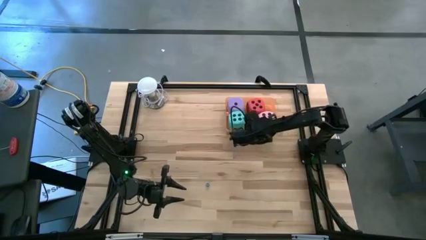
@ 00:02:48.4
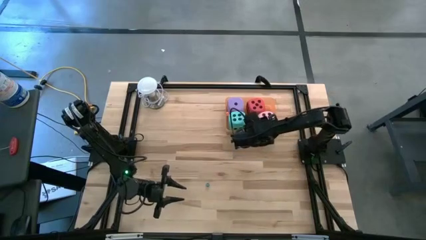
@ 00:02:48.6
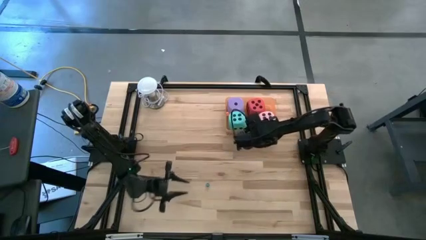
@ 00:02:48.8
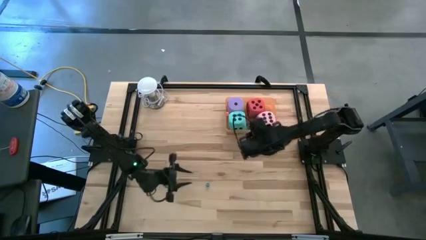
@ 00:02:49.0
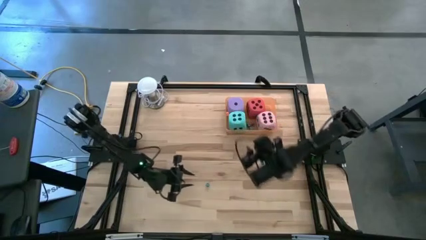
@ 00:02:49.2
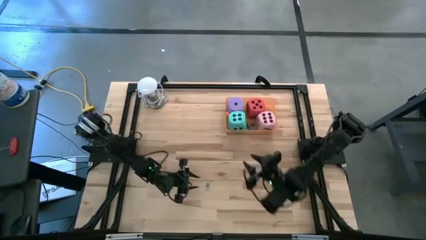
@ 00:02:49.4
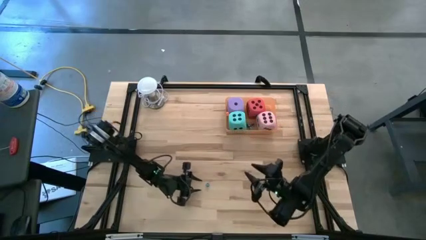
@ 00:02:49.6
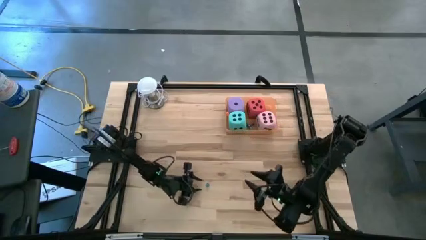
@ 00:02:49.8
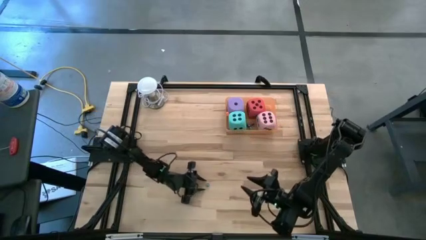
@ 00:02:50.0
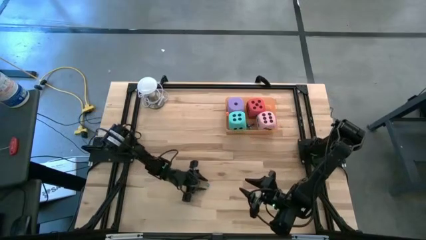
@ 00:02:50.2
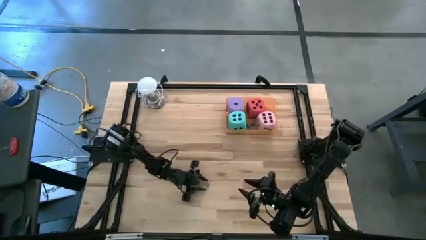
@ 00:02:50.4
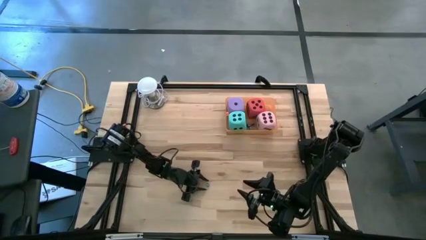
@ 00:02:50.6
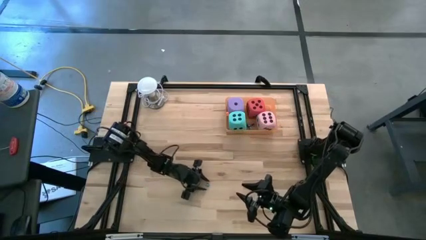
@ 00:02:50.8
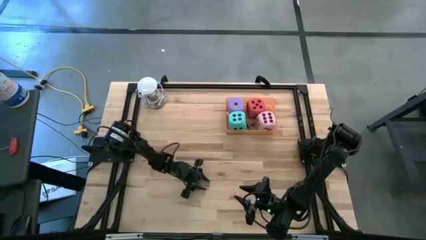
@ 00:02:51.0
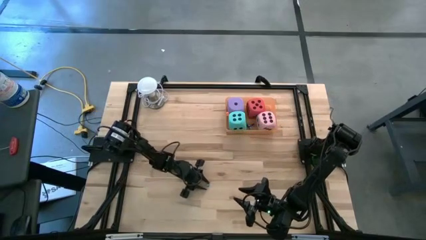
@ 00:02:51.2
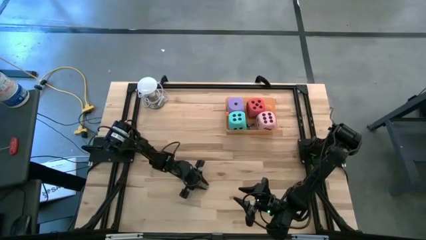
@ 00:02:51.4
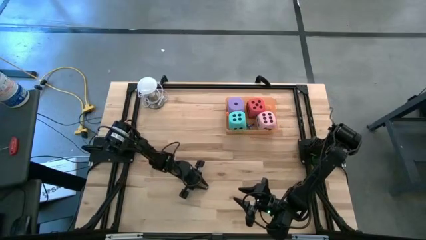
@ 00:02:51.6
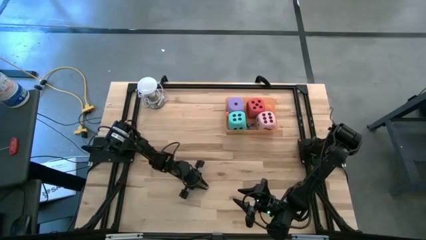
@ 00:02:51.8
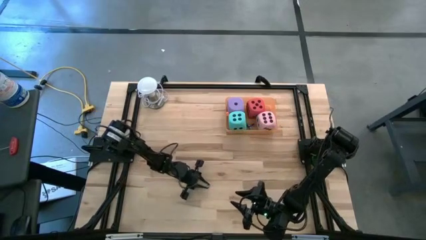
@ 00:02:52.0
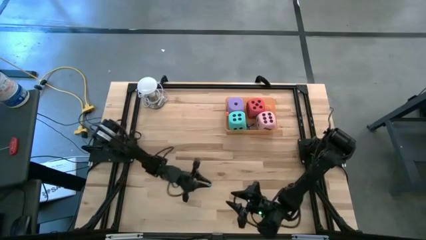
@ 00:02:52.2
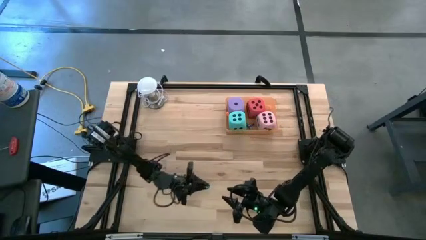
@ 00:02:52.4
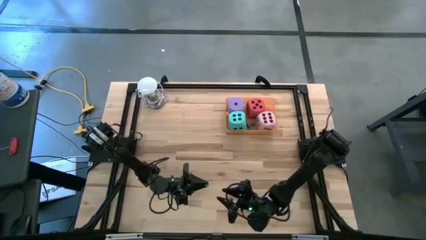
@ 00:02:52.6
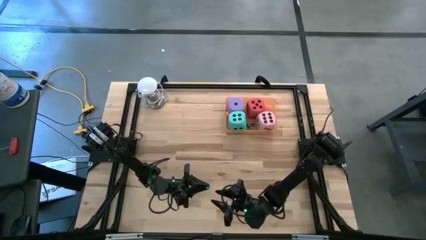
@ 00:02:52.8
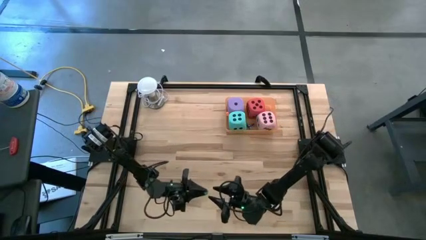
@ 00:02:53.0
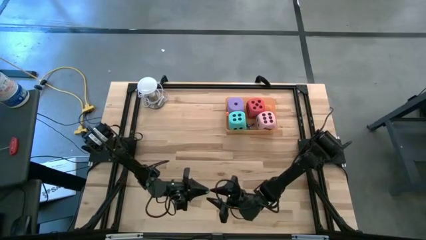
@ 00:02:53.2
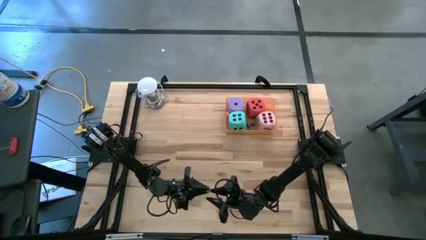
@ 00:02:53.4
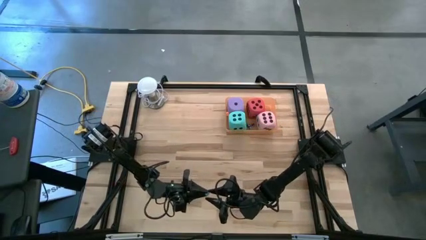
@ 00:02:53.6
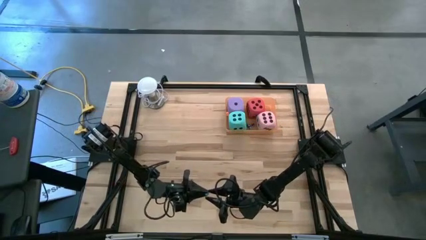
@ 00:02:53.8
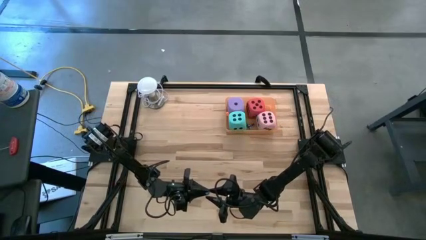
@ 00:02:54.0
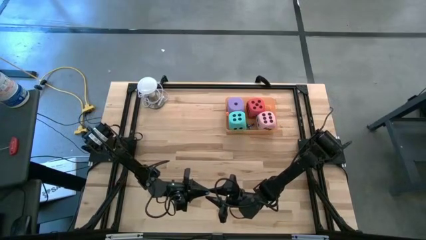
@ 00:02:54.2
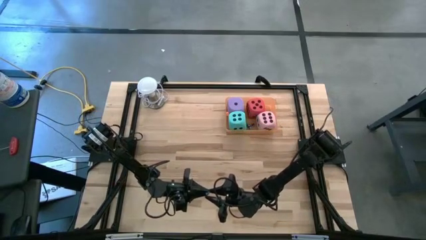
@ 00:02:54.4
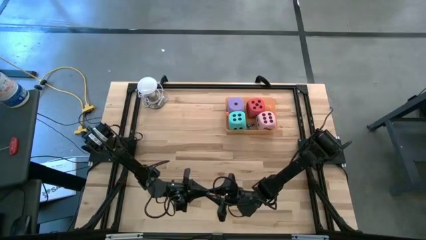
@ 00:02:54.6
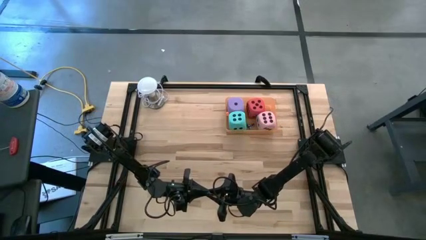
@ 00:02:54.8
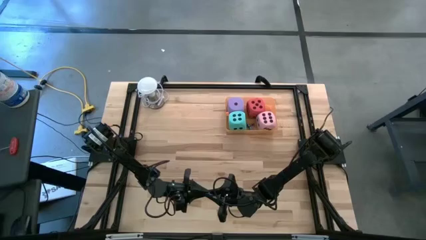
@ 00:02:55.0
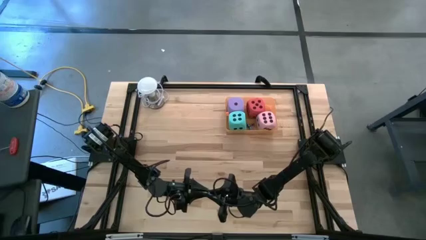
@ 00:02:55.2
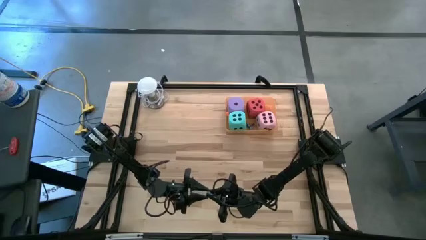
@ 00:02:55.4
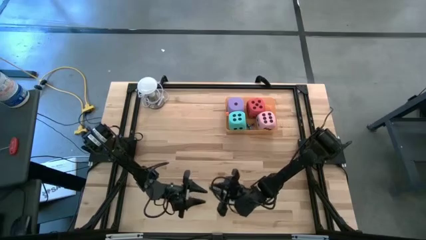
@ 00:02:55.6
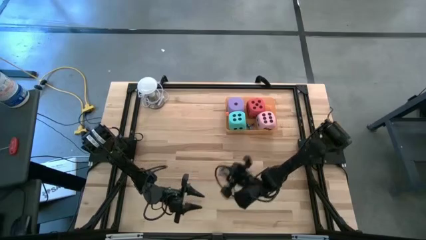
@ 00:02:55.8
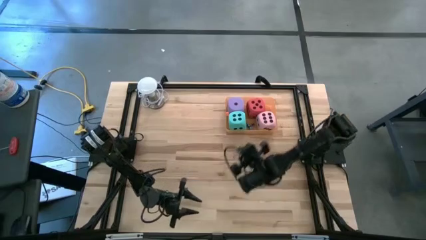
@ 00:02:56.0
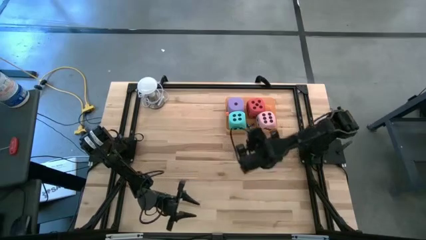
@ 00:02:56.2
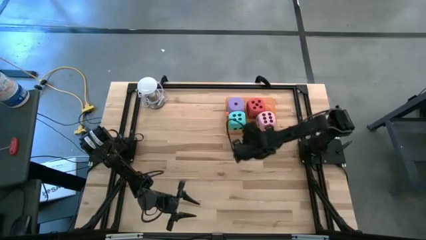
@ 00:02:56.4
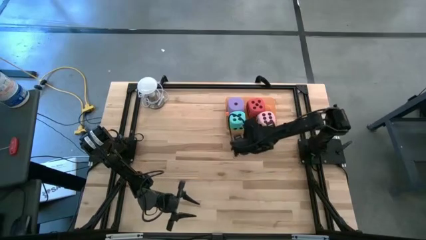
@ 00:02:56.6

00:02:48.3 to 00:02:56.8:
Task: Pick & Place Dice
Put the small light blue die into the the orange bin

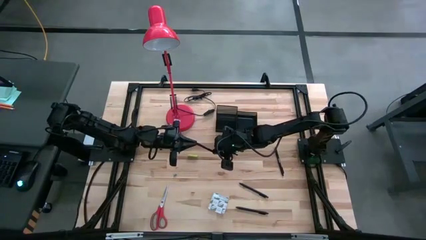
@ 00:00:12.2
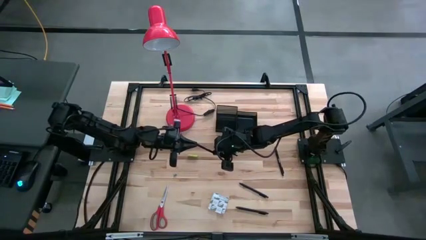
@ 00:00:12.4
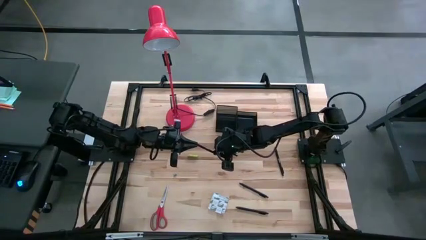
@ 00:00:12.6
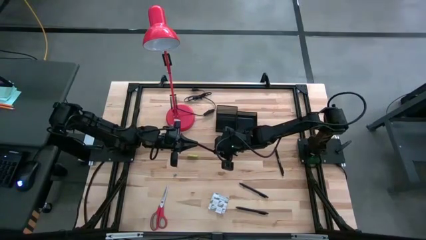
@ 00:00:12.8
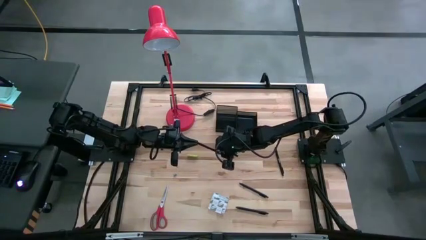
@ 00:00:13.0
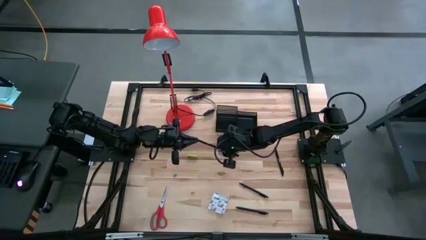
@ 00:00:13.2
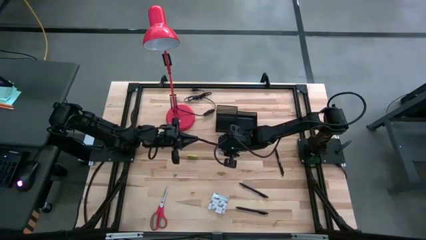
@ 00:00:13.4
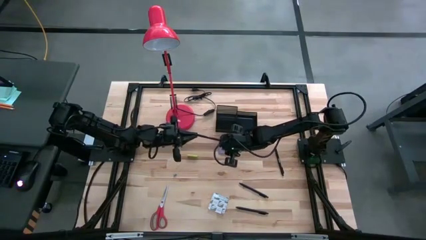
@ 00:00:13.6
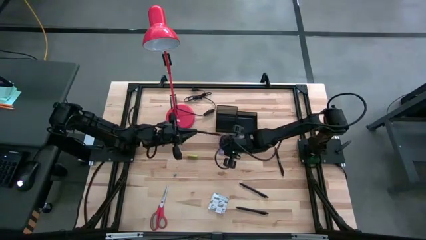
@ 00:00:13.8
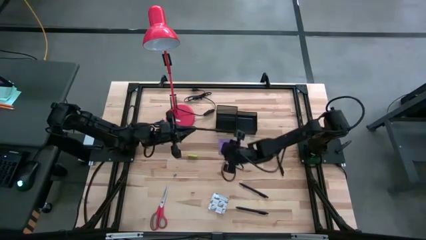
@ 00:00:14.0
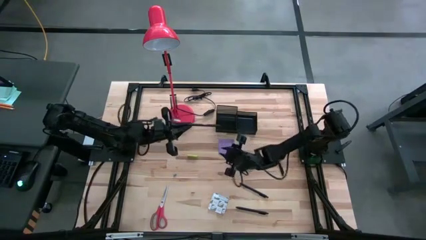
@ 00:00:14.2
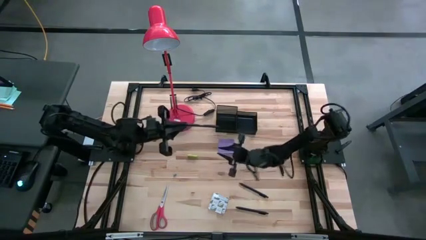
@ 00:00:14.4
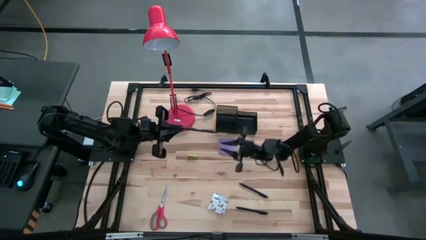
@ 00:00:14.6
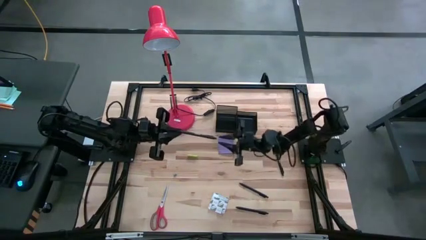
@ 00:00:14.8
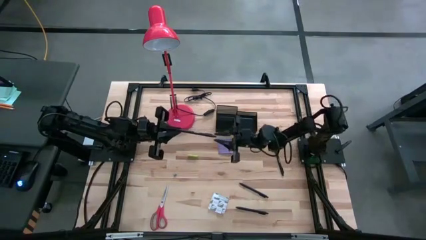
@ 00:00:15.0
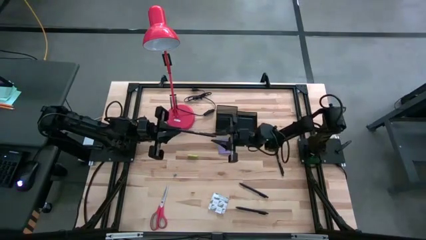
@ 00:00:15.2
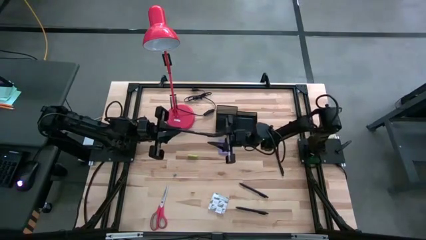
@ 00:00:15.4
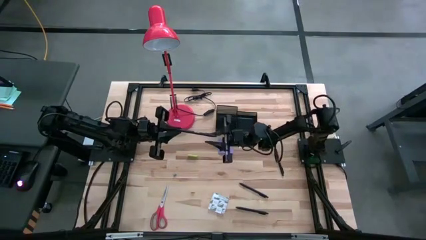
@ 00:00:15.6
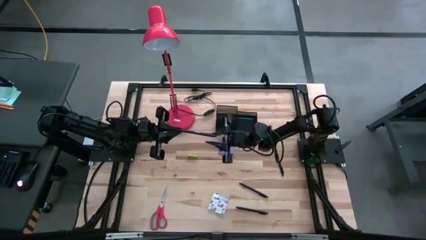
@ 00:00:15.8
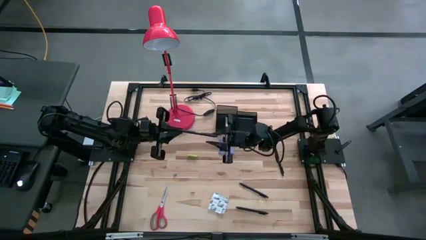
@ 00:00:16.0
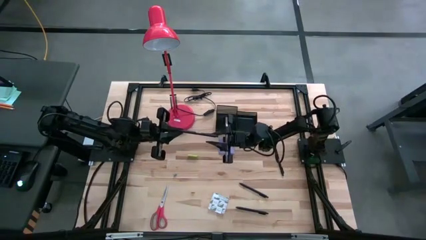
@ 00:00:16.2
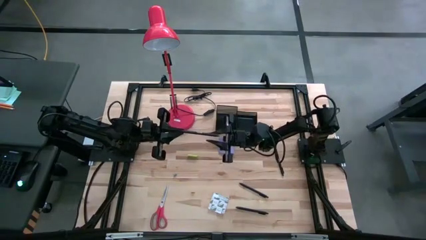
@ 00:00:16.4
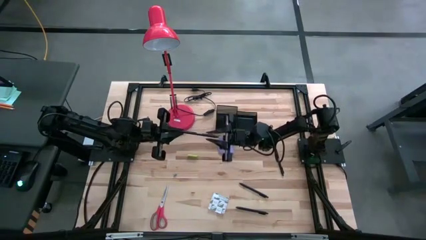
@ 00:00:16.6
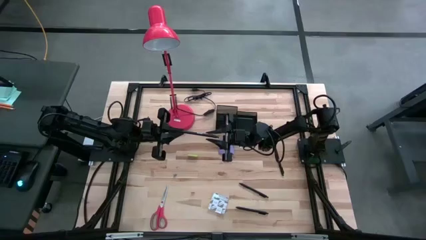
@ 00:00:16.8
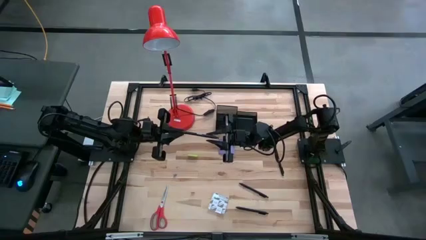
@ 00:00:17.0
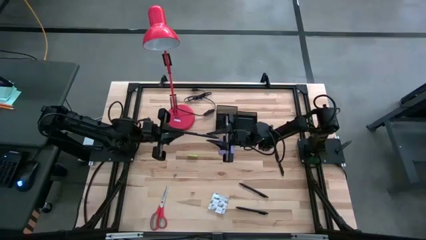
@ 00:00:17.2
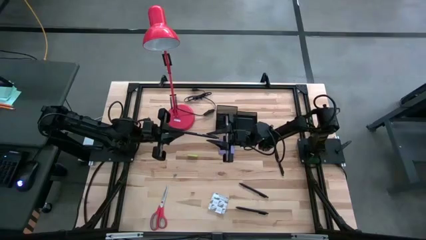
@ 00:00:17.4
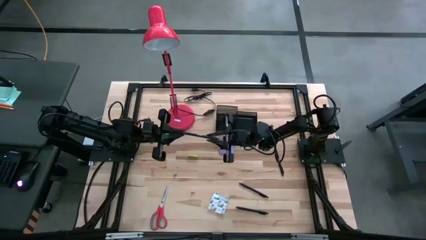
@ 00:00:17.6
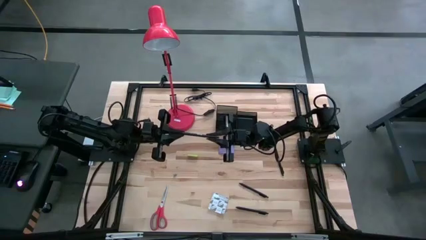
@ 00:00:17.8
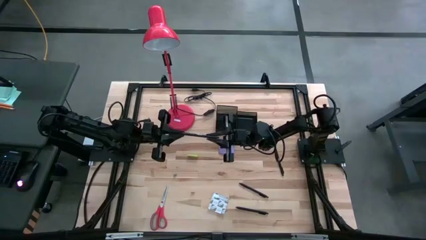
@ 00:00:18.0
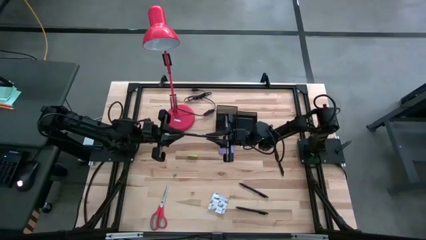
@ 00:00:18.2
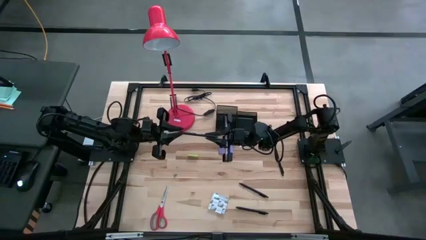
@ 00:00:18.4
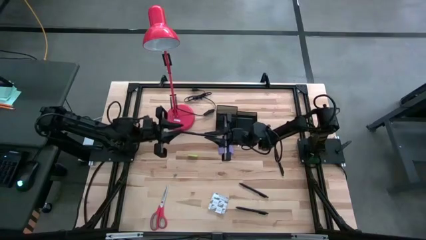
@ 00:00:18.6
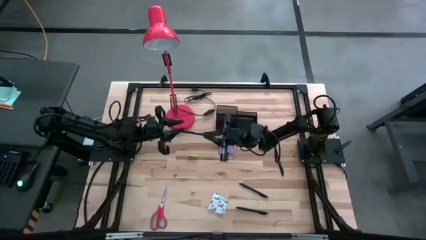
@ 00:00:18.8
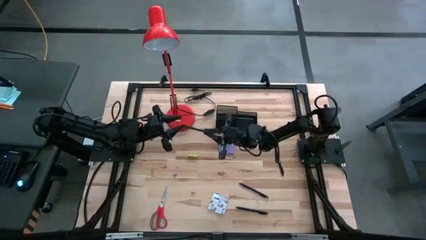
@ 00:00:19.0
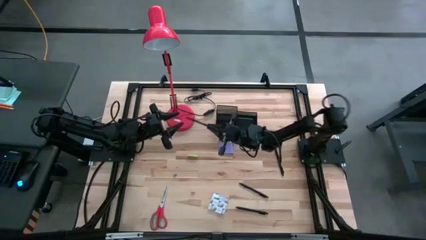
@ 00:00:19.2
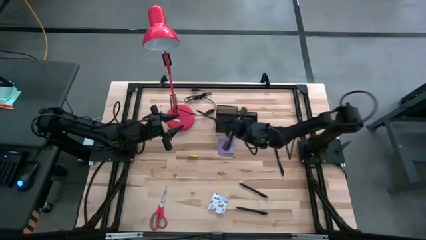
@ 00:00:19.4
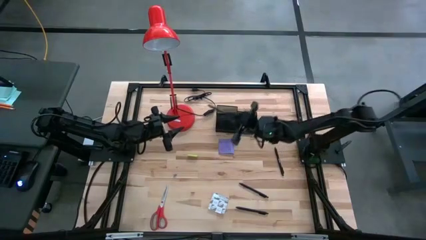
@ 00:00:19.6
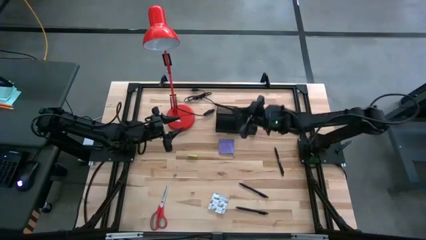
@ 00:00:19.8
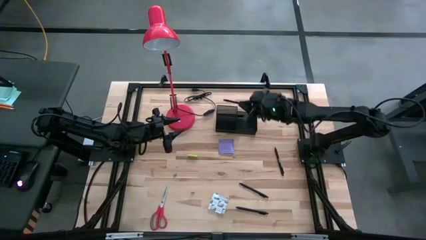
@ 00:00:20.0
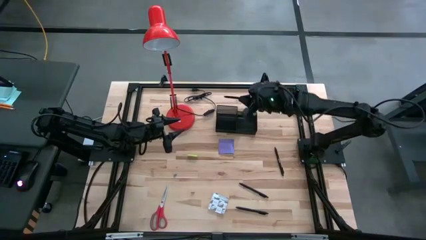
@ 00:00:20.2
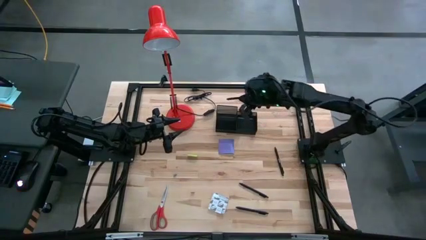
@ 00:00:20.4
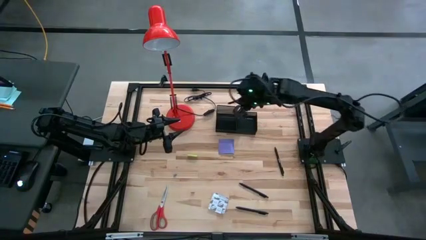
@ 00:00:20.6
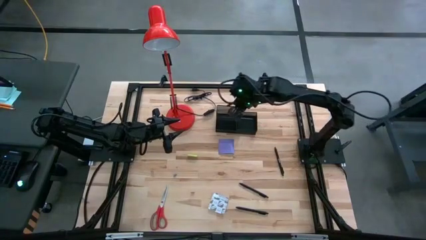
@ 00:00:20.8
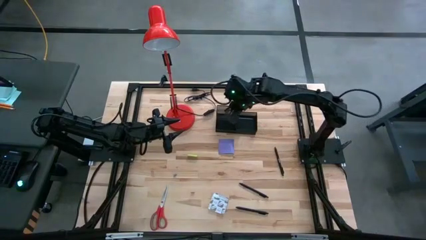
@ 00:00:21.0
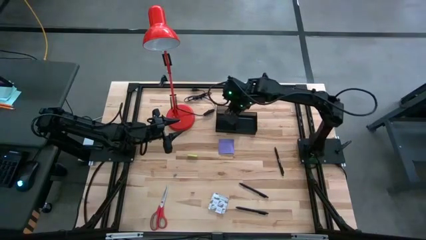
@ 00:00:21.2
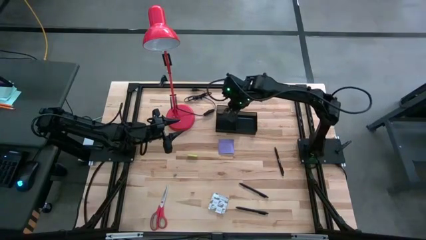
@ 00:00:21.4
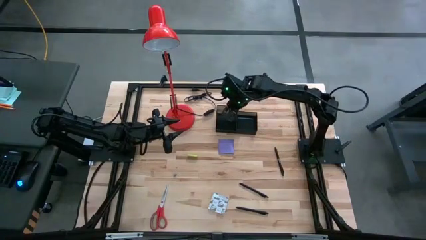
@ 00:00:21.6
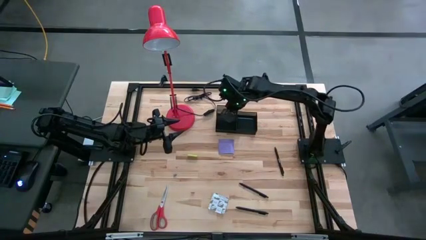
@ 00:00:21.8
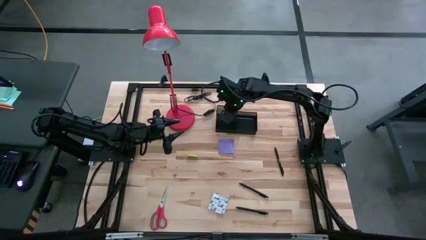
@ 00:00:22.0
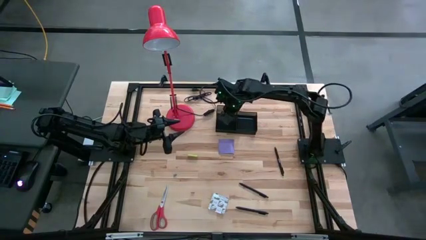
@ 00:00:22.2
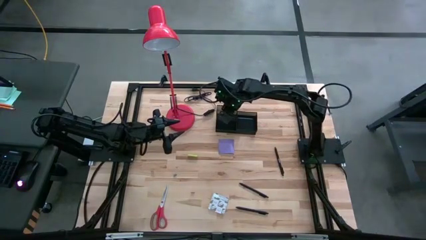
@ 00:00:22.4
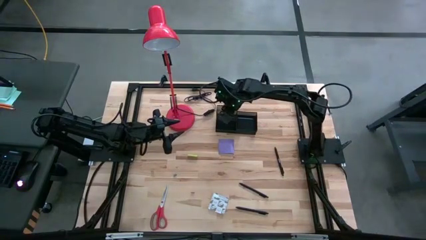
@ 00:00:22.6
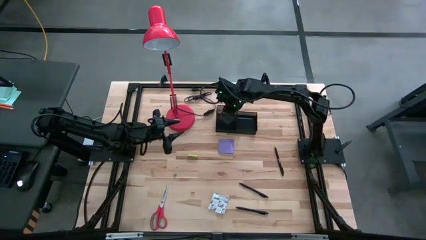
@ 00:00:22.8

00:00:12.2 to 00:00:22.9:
Task: Pick and place office supplies into organizer
Put the black pen into the black desk organizer
